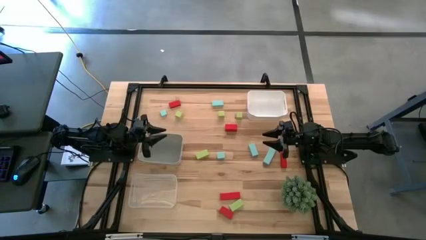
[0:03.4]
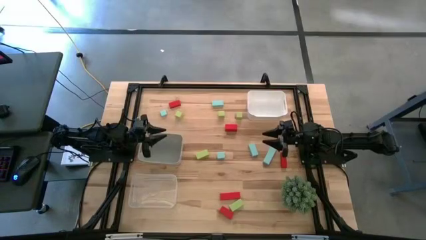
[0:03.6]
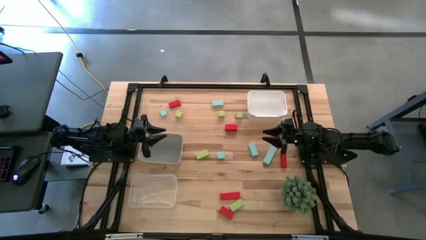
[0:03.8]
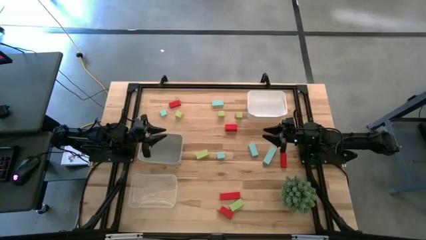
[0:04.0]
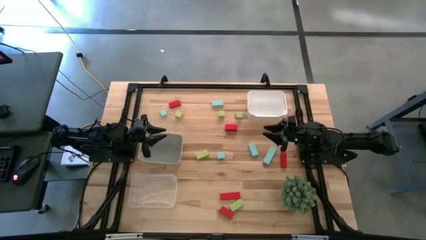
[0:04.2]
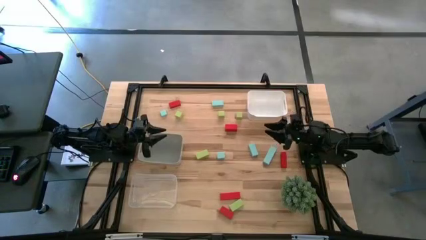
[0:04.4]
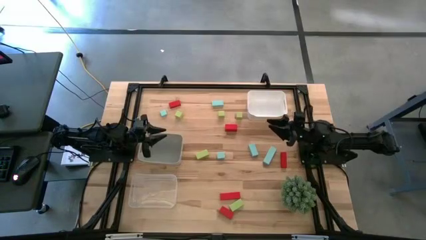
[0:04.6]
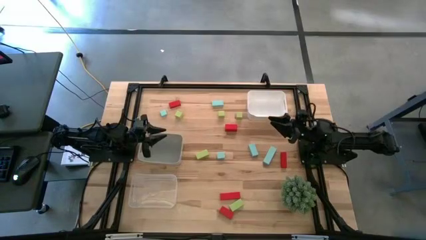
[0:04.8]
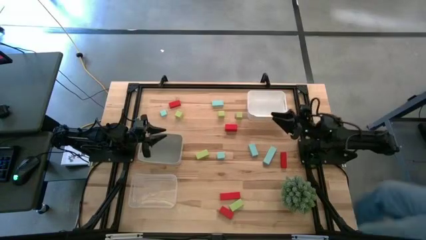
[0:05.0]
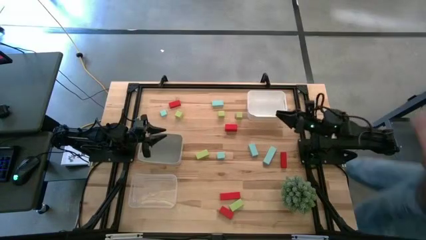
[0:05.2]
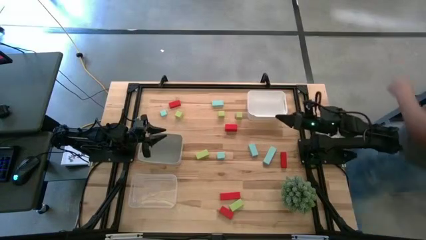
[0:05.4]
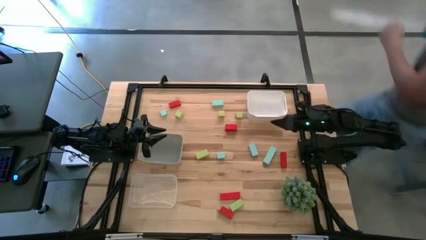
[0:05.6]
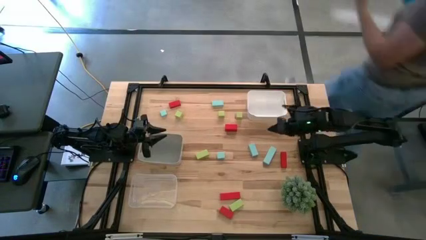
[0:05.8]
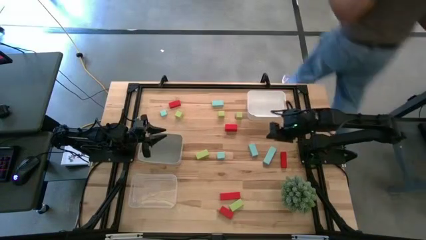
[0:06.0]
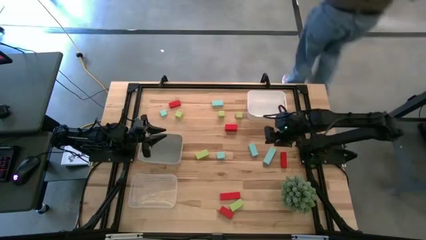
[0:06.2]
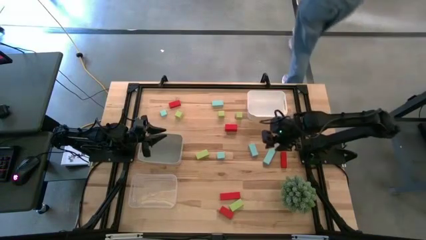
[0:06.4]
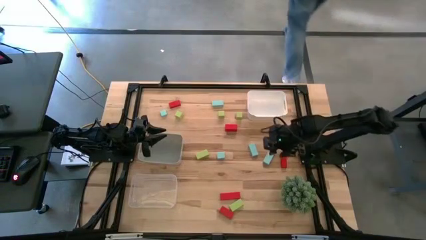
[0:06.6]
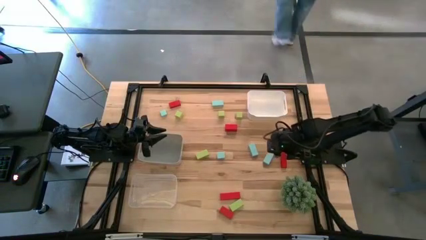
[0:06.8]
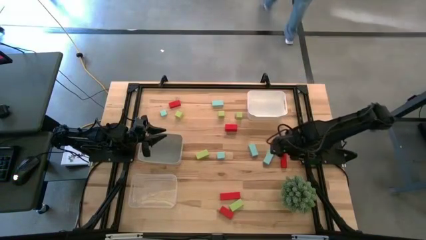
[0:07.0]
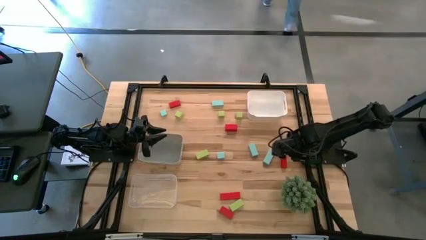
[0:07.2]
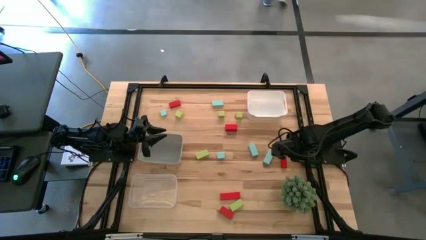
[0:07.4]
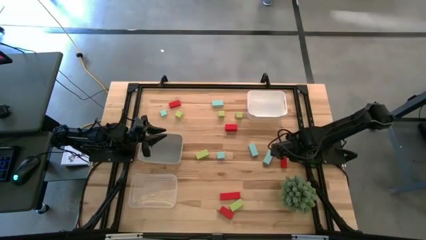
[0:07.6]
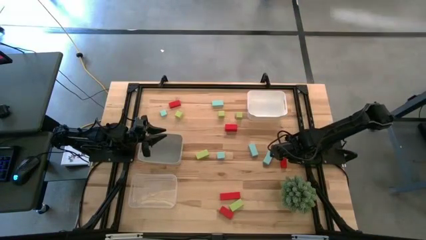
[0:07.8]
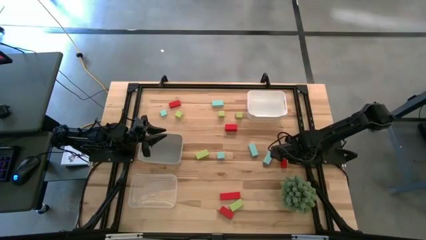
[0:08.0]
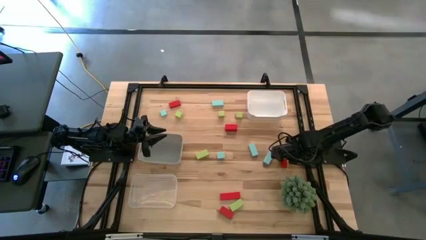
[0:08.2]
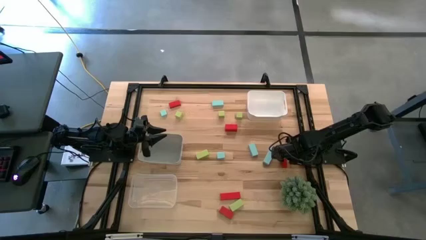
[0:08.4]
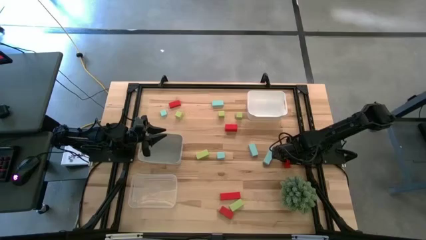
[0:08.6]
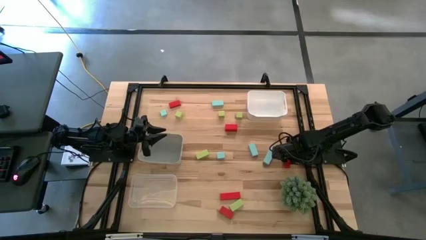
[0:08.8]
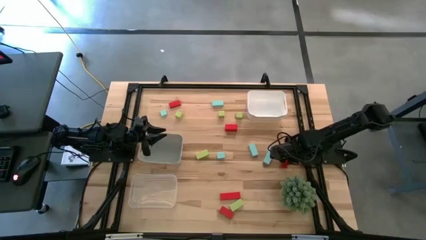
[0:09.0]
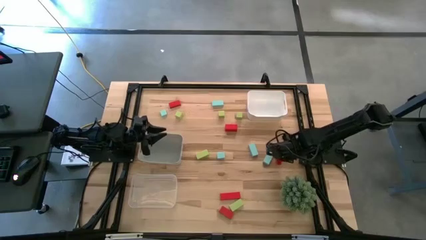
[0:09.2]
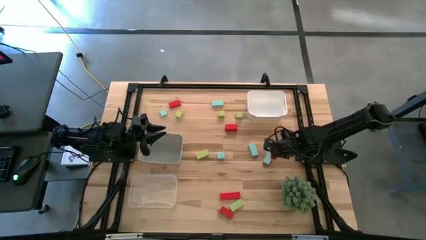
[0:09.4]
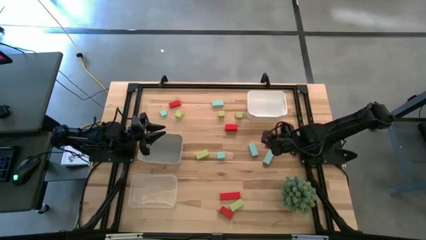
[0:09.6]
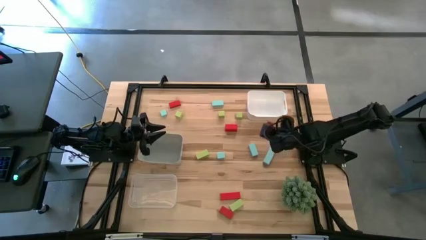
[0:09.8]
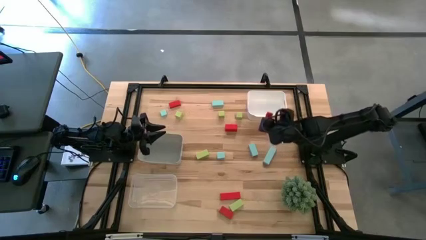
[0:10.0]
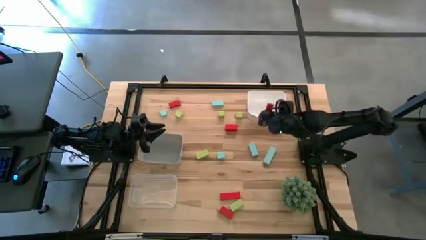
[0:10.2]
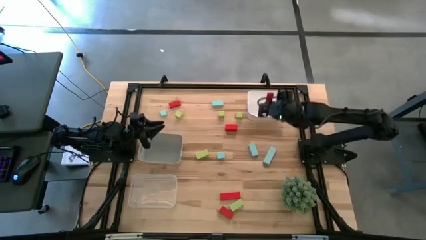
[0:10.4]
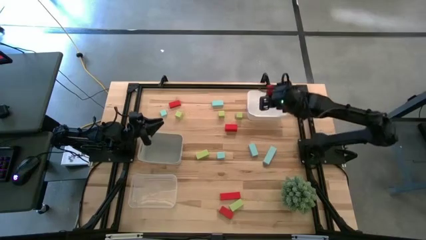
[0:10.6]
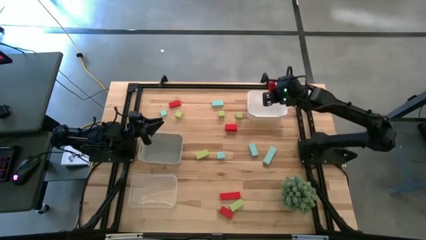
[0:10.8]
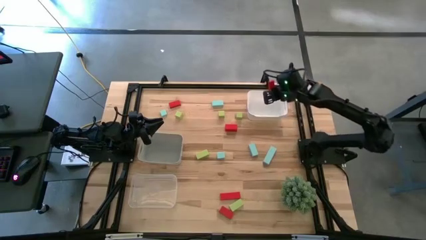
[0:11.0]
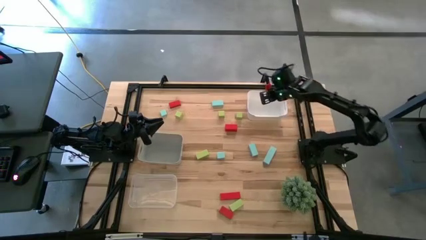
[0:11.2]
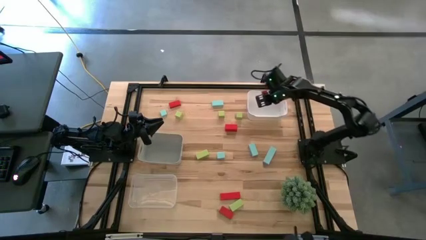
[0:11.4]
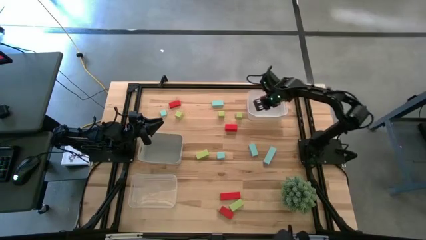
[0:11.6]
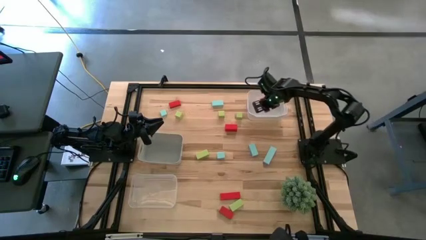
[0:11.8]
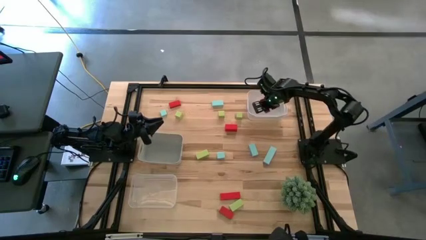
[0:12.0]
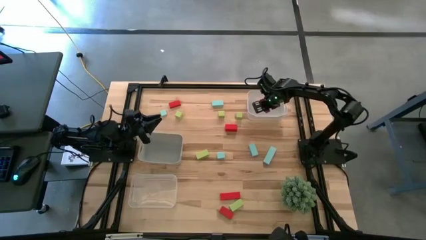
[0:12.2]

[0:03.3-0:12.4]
Task: Sort & place blocks by color
Put the red block into the white bin

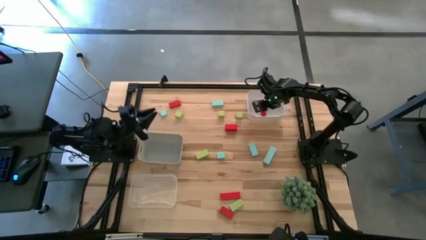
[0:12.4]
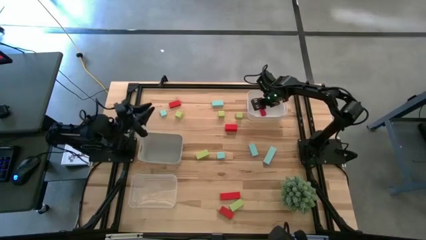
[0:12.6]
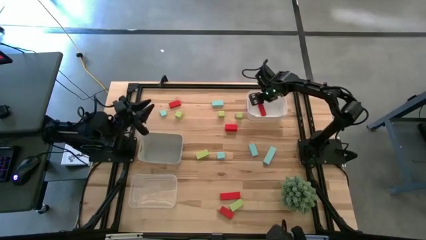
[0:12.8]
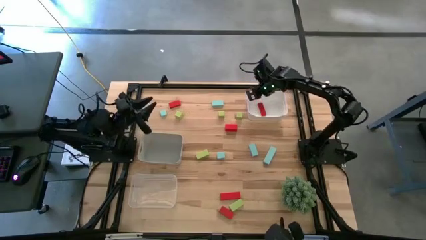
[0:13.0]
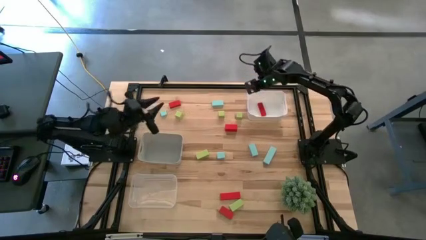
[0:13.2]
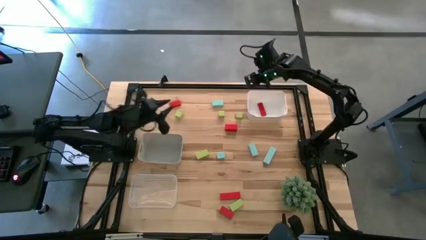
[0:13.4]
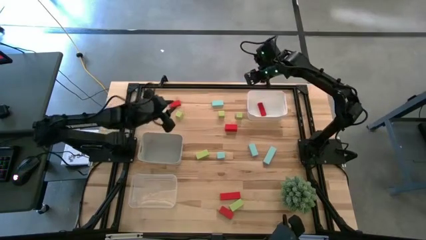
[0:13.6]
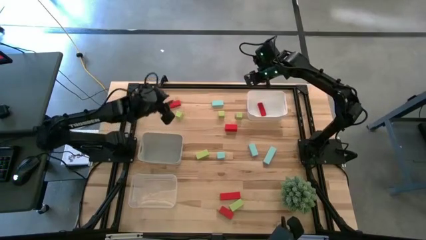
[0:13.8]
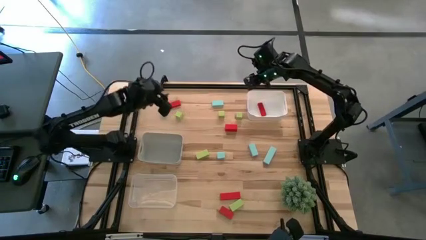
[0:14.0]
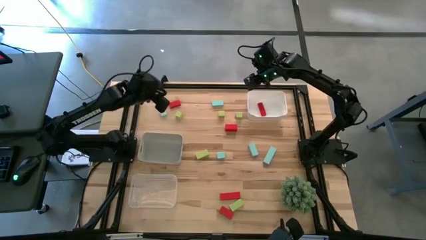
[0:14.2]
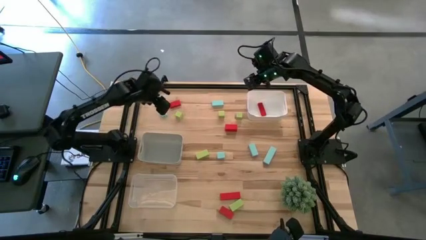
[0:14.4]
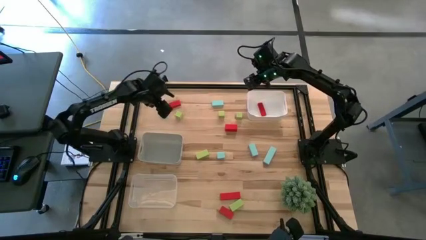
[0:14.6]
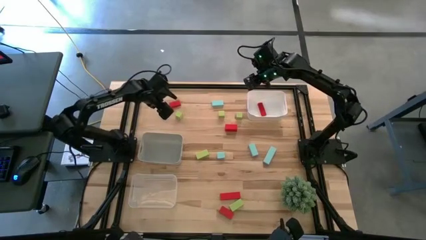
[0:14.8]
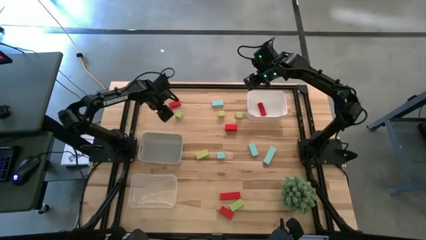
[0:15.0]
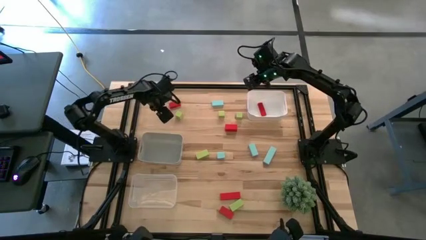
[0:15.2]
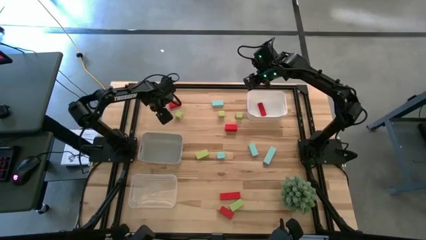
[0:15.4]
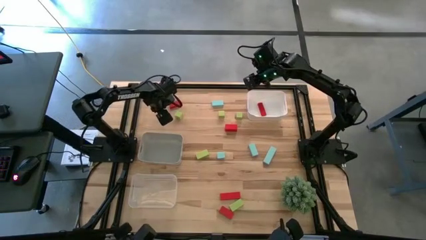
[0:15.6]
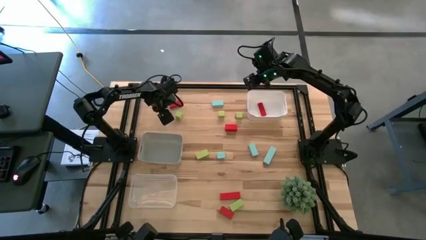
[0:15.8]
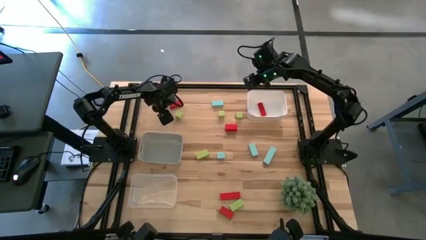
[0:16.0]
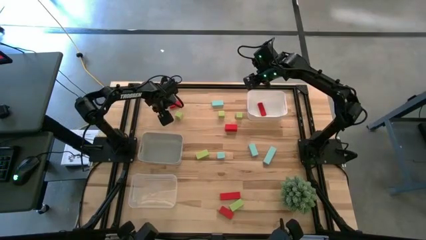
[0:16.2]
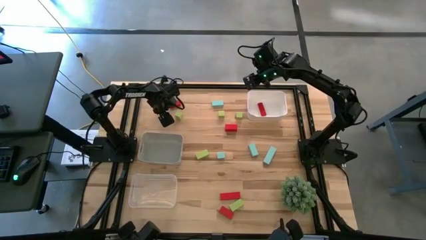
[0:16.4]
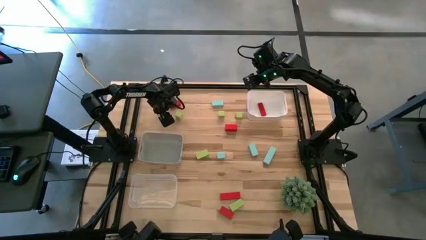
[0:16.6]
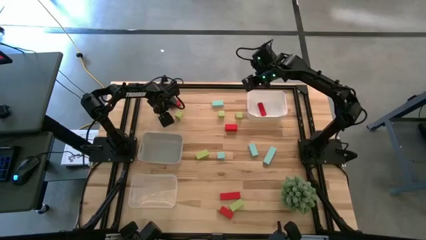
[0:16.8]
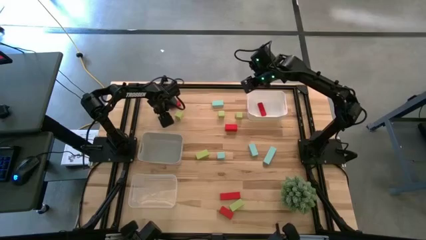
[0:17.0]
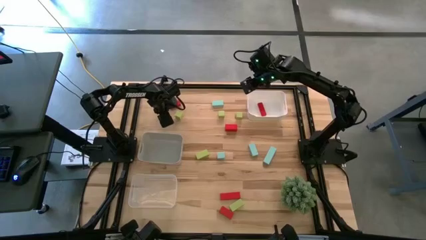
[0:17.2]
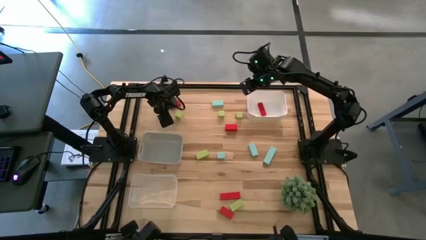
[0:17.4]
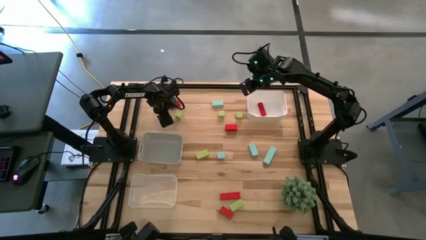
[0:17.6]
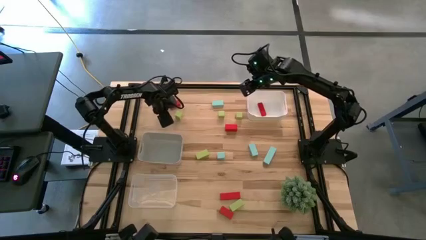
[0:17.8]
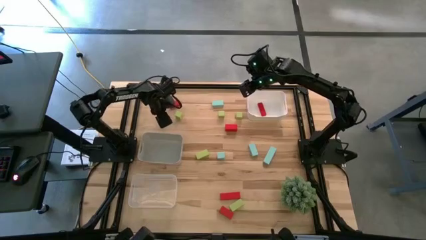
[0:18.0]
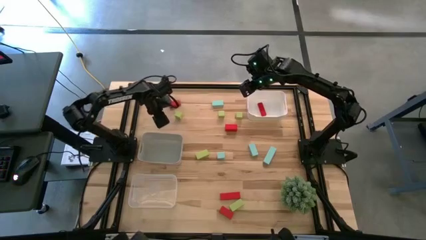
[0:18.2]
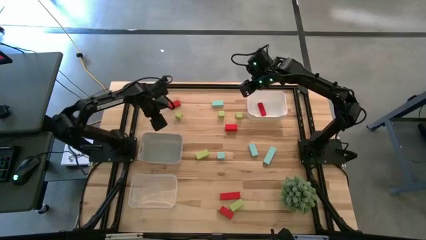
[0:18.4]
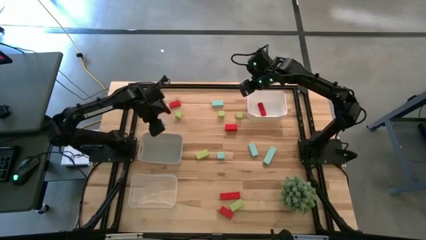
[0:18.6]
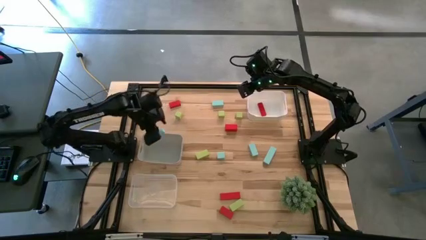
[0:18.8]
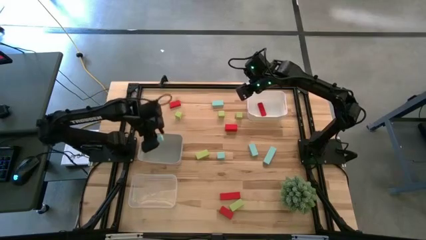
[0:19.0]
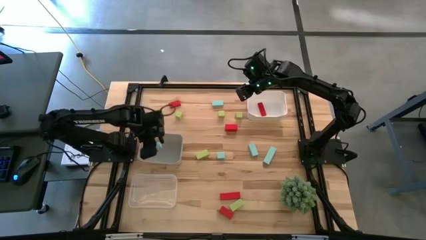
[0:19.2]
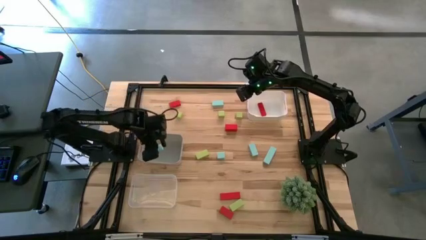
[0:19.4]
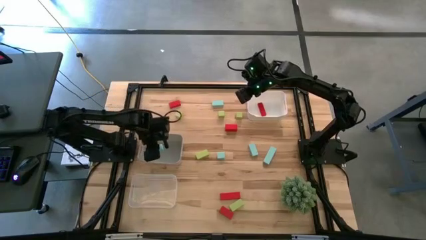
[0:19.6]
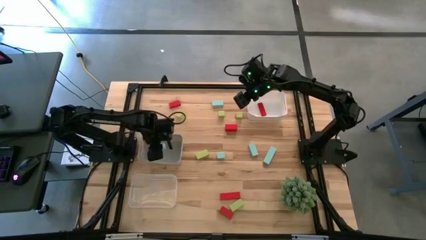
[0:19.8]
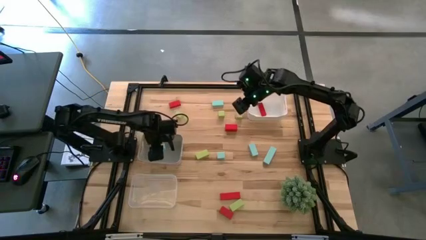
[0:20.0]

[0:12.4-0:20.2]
Put the blue block into the gray bin
